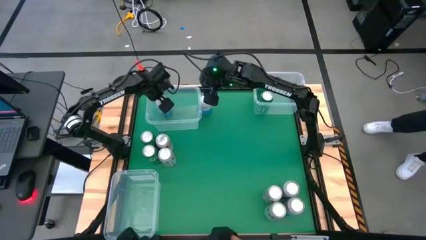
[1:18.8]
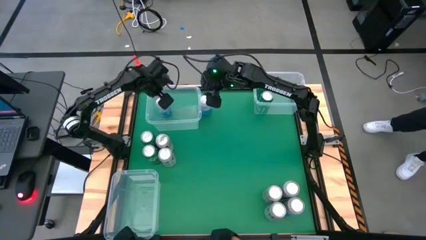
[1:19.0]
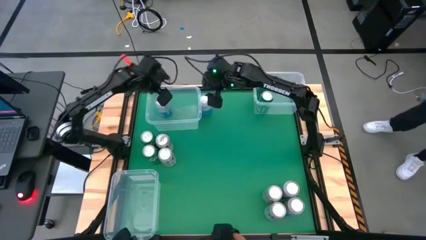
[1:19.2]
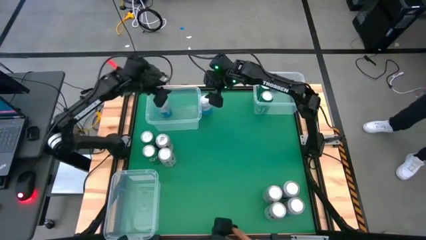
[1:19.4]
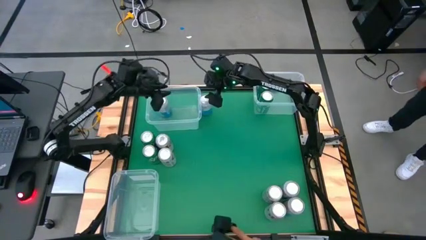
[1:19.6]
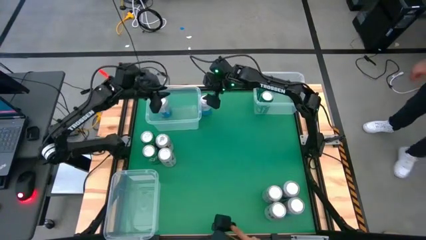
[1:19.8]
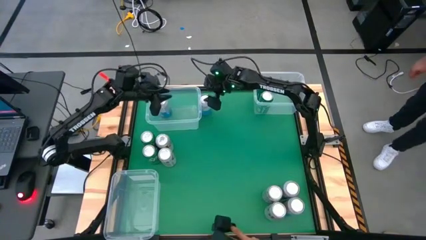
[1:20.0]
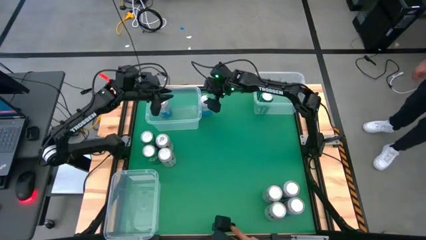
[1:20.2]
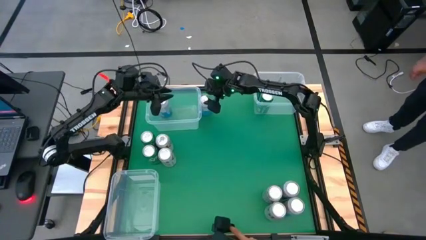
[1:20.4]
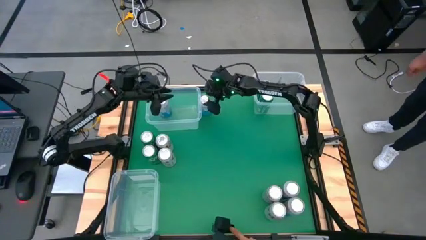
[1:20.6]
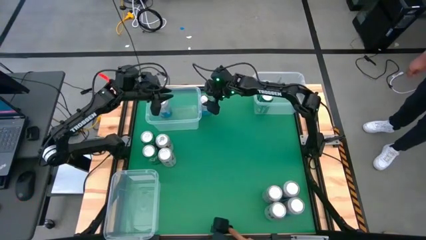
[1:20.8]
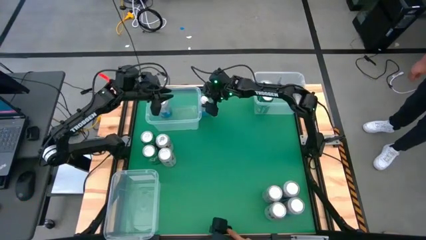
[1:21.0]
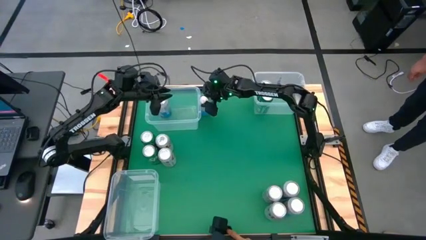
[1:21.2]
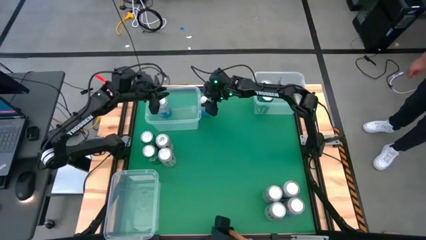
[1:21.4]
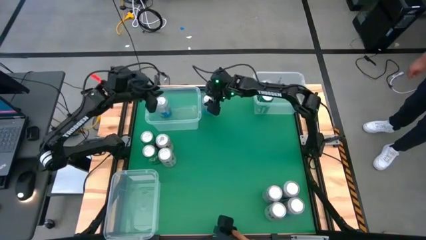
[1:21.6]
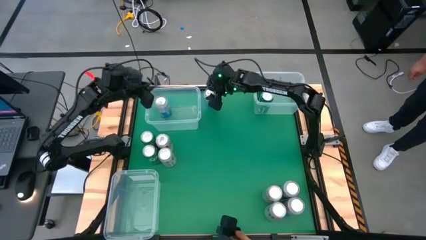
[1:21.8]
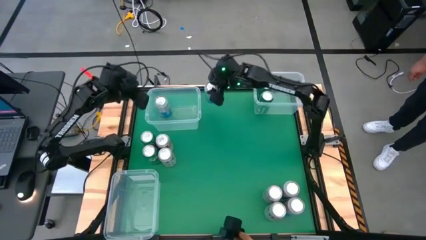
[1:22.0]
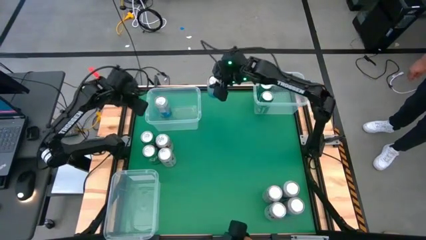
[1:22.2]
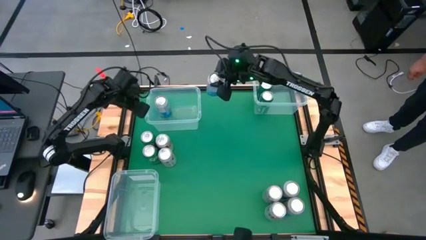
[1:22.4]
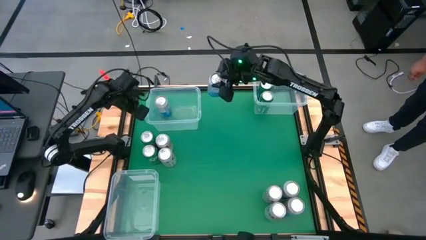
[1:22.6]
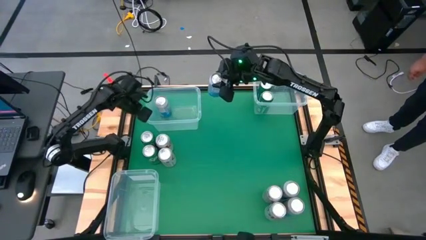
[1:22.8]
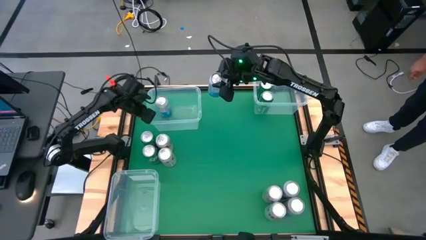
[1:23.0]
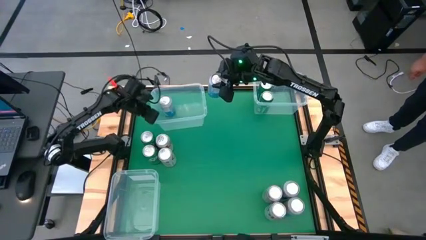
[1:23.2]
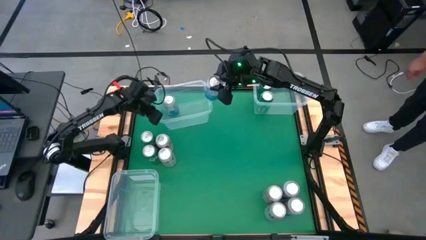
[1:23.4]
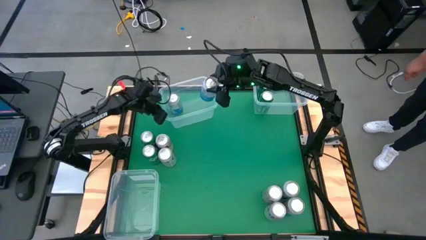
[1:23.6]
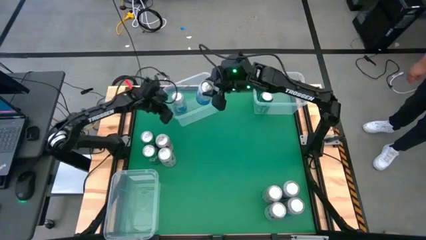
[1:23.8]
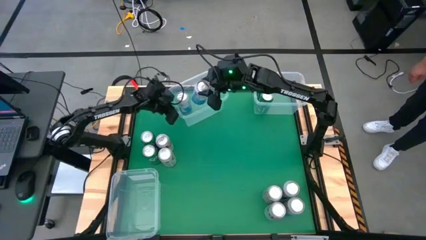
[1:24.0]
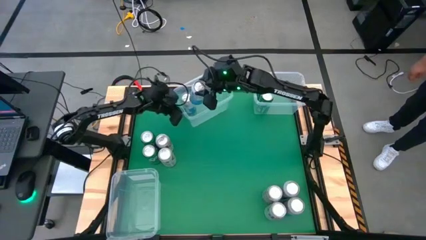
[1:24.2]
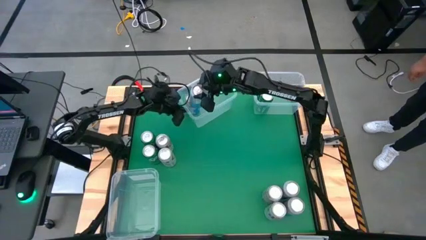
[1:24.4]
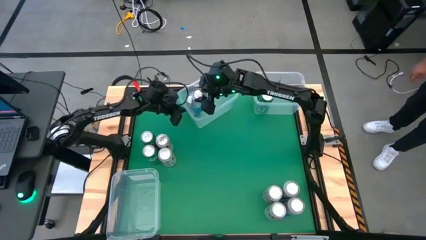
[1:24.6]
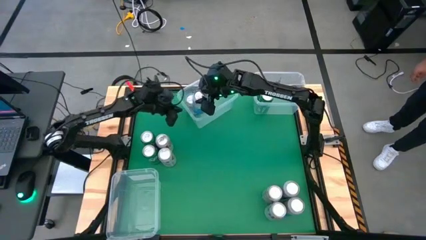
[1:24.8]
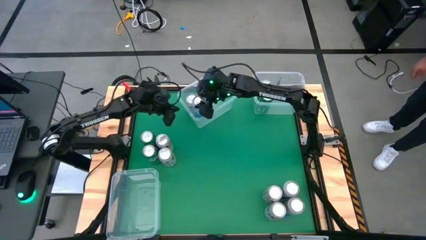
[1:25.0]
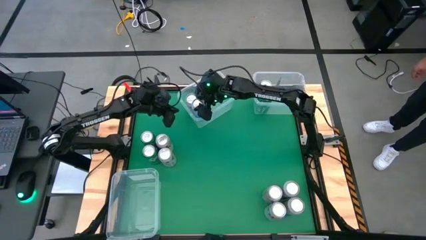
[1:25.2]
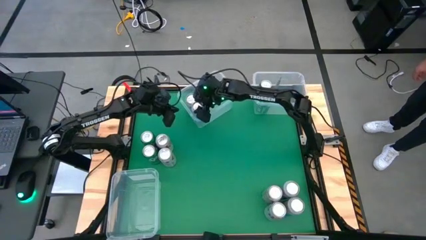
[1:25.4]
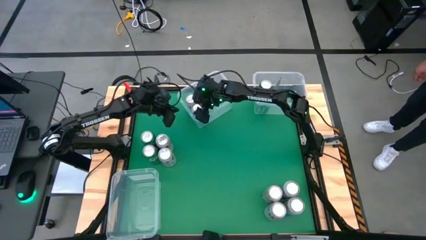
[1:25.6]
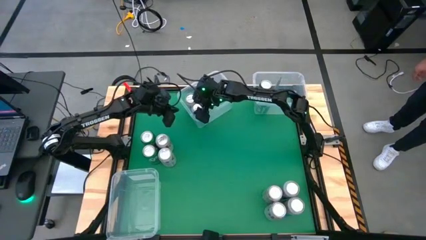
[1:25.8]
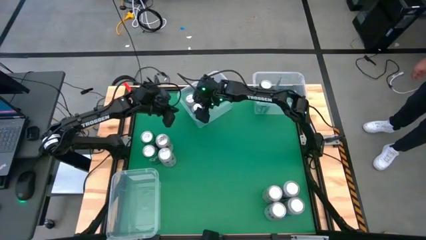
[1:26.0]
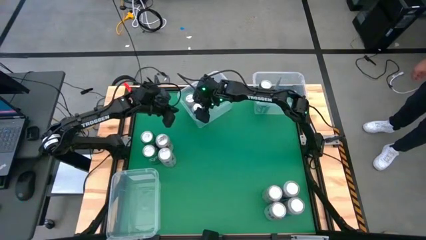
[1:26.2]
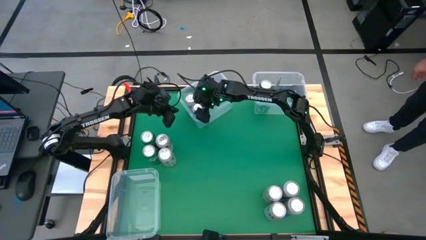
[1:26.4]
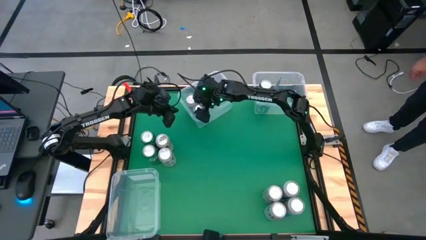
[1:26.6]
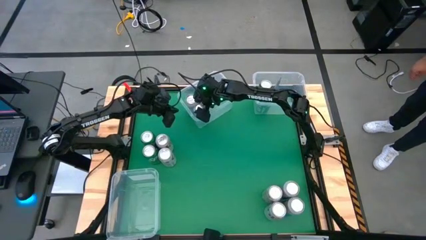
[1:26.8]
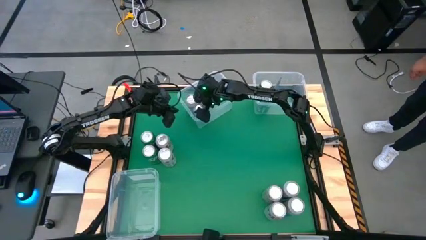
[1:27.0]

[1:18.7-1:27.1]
Task: Sort soda cans
Put the top blue white soda can into the top left transparent bin

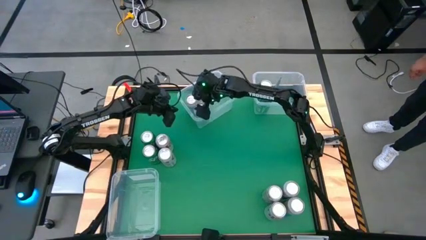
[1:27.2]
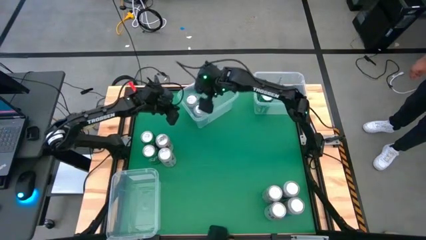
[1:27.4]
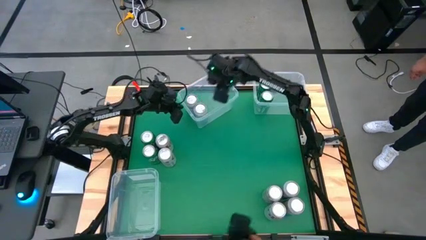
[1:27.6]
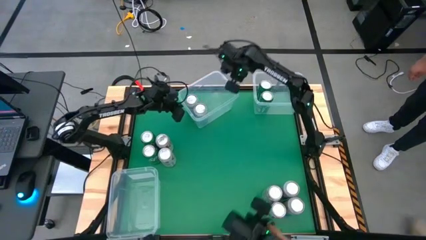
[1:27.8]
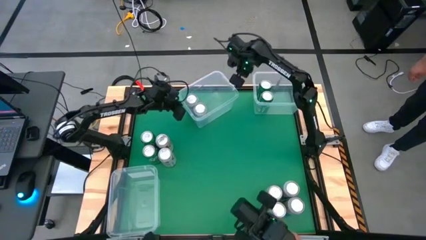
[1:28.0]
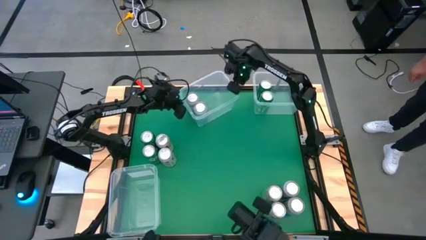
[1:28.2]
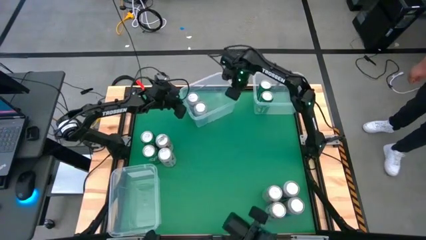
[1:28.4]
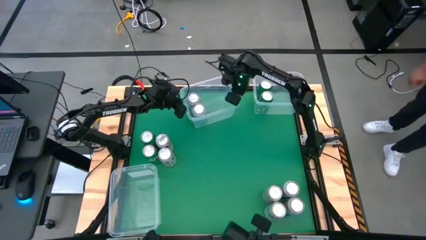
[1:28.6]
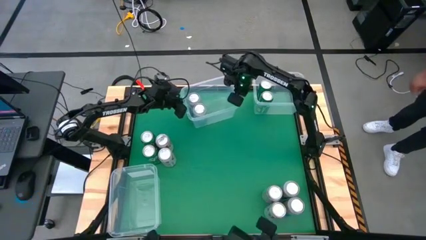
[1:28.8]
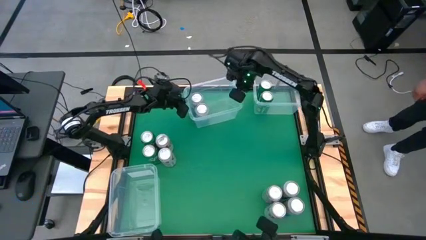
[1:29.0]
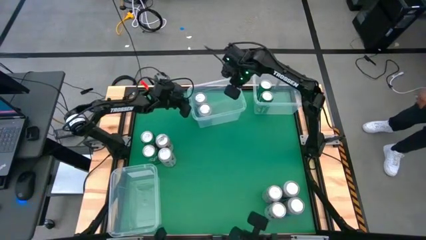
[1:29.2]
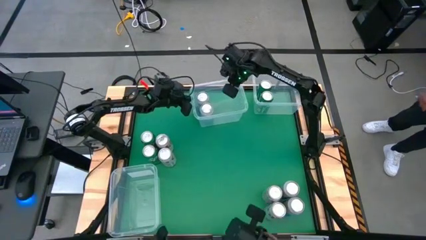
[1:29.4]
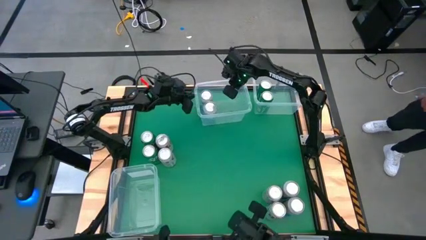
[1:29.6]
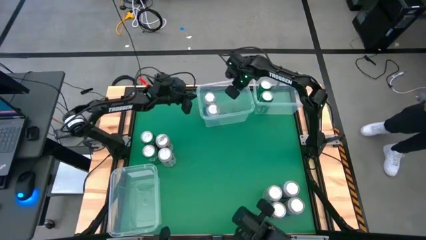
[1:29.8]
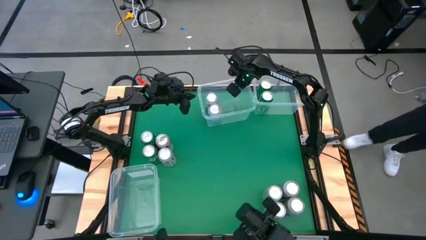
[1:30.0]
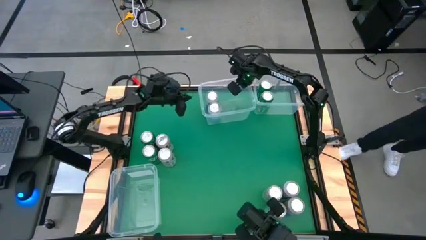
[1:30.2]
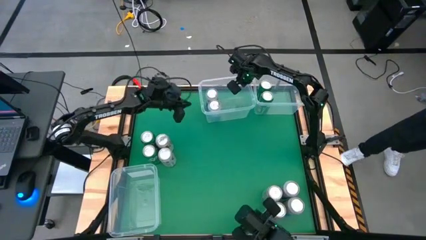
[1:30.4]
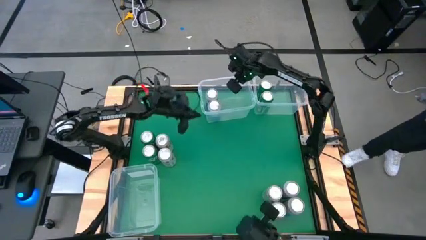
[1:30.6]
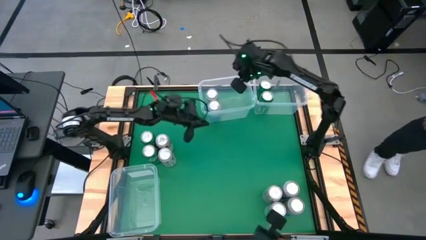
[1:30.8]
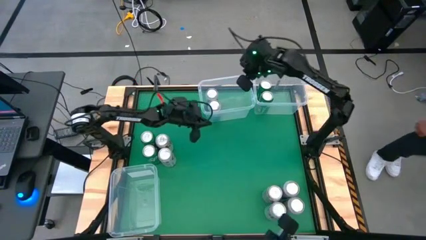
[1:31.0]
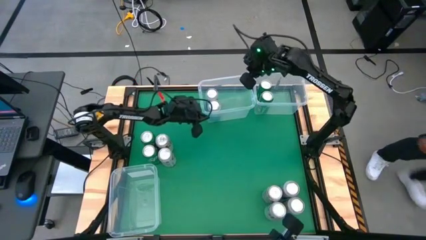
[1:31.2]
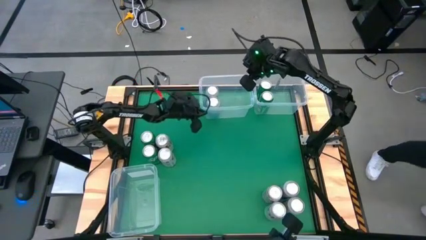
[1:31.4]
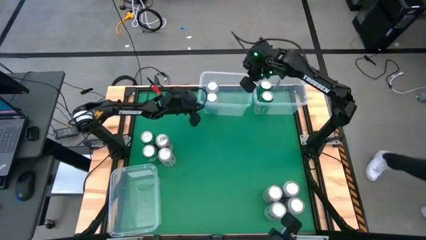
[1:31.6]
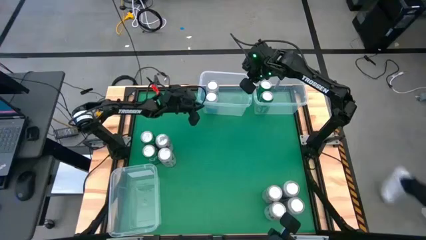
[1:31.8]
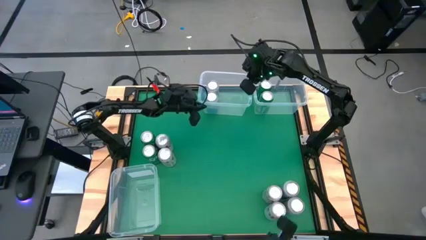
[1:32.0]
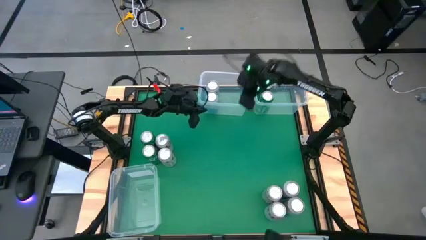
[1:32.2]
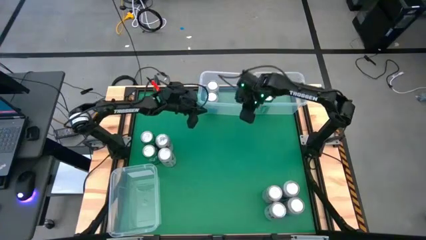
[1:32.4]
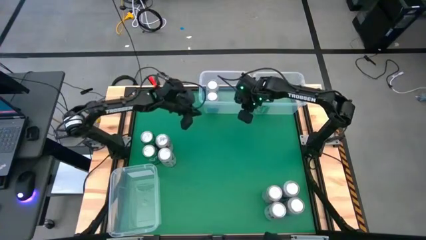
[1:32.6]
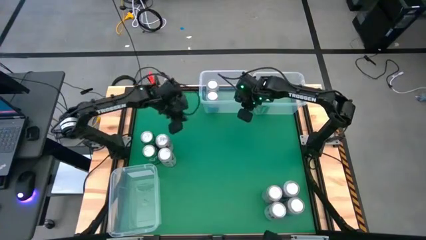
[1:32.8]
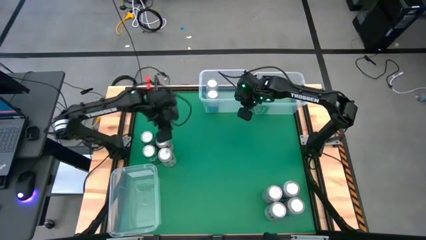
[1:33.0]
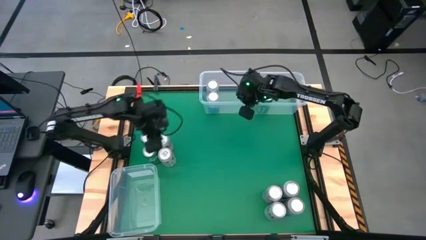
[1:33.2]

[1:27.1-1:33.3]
Adjust the top left transparent bin

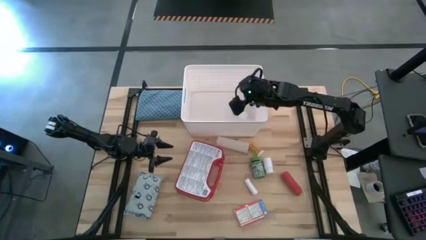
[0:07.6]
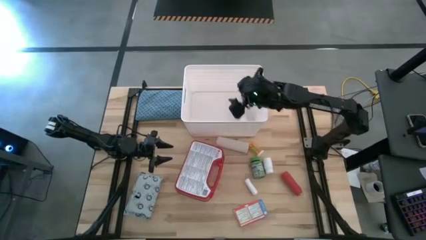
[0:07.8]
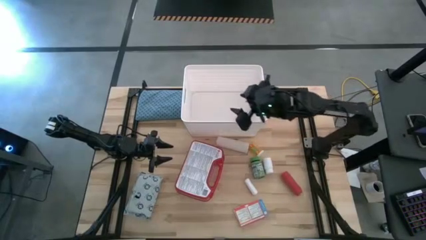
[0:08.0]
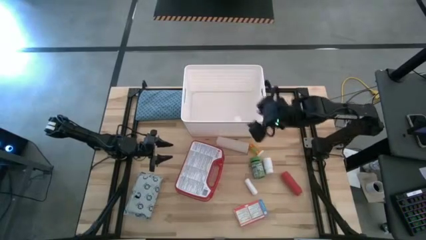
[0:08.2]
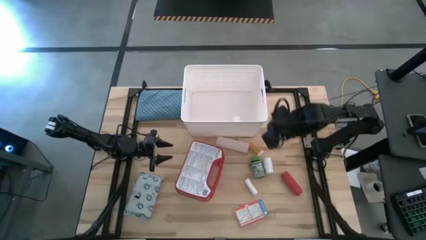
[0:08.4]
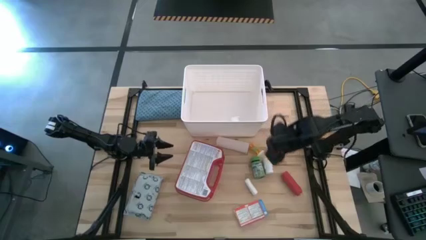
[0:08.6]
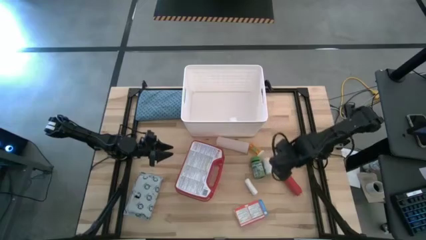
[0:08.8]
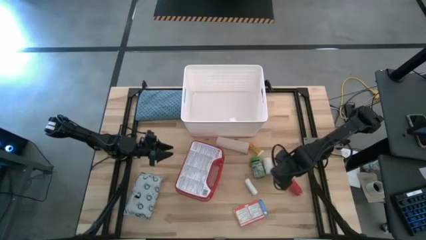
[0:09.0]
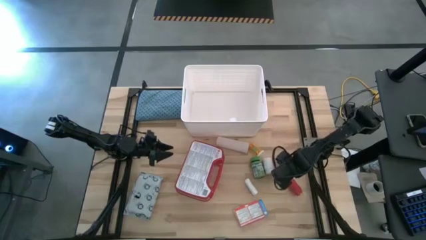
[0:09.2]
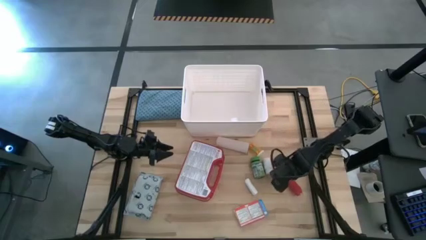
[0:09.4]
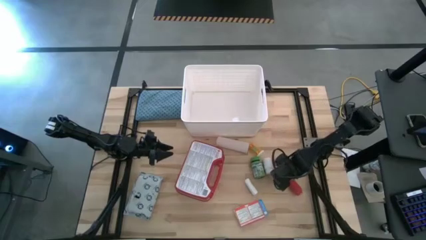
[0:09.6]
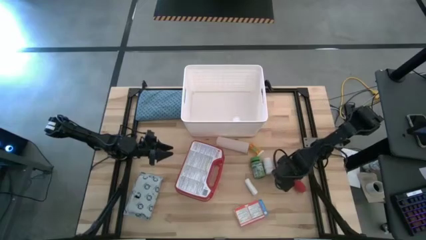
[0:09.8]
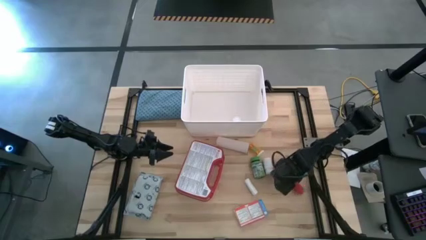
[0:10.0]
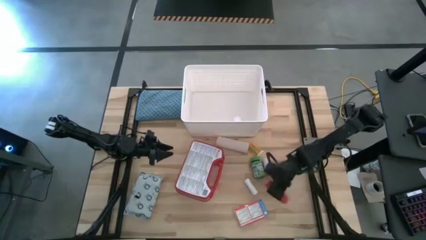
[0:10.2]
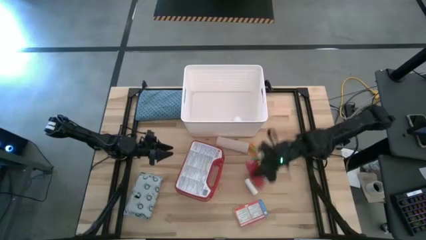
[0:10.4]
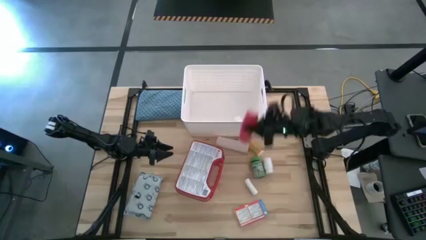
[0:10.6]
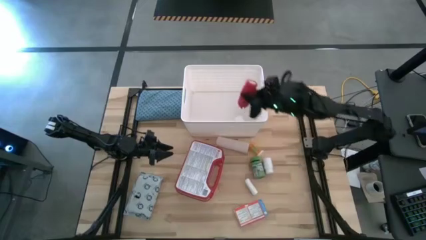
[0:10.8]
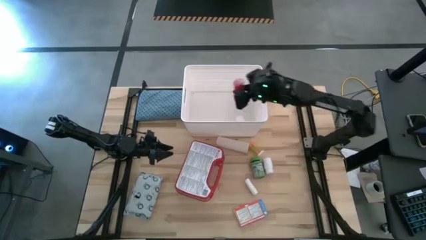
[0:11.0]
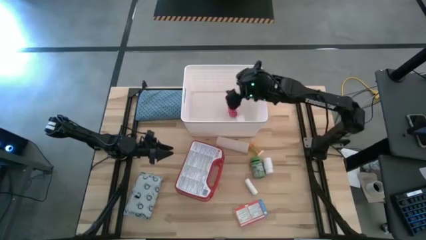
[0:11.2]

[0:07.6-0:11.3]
Task: Pick & place medical supplies in basket/bin
Put the red bandage into the white bin
